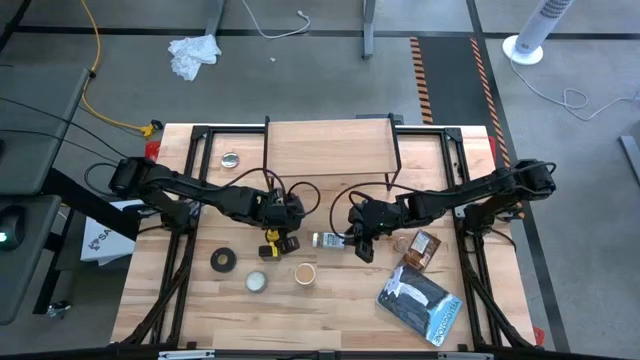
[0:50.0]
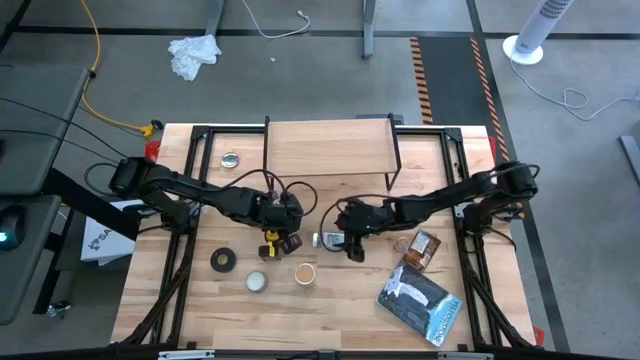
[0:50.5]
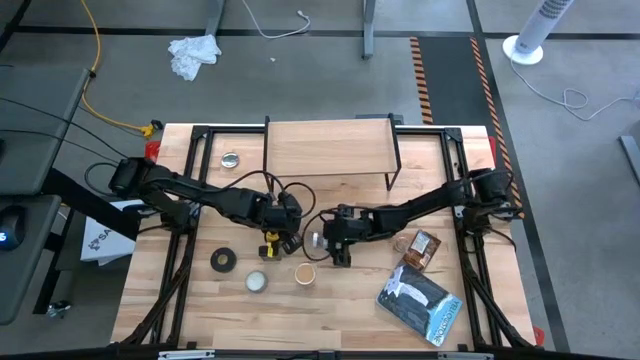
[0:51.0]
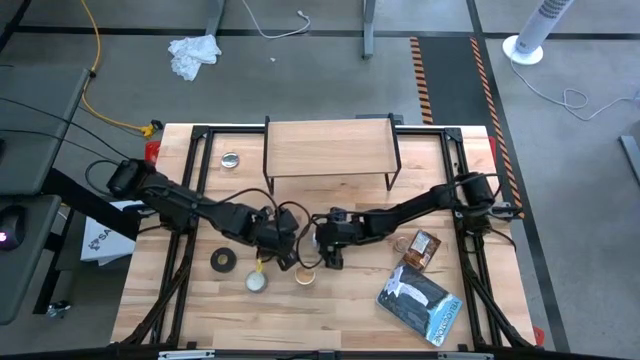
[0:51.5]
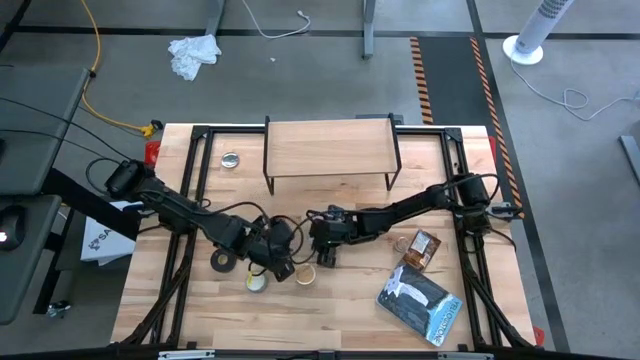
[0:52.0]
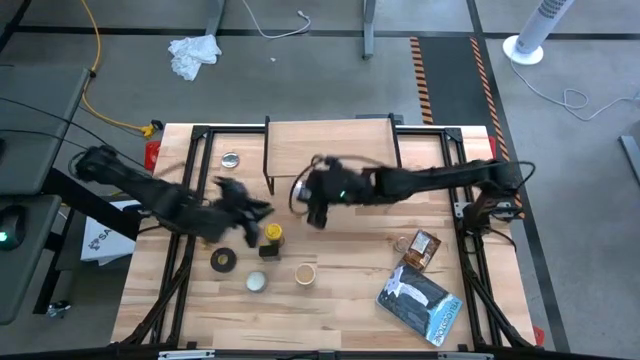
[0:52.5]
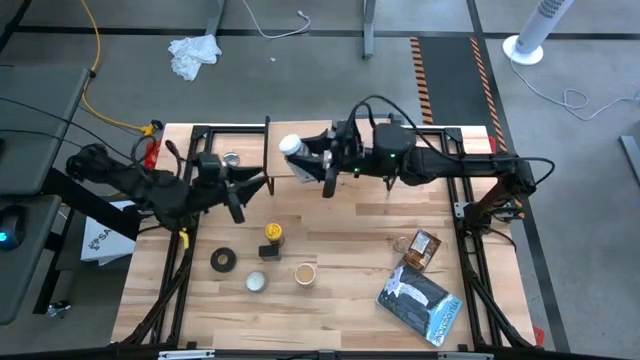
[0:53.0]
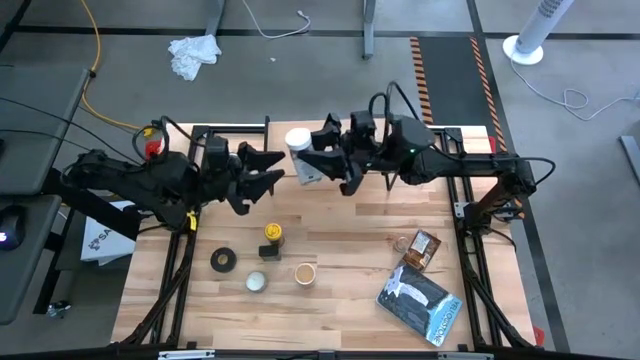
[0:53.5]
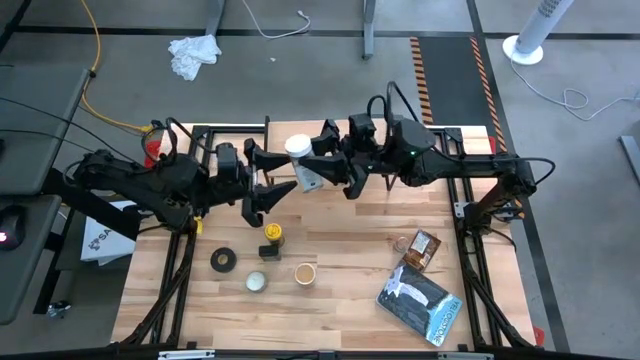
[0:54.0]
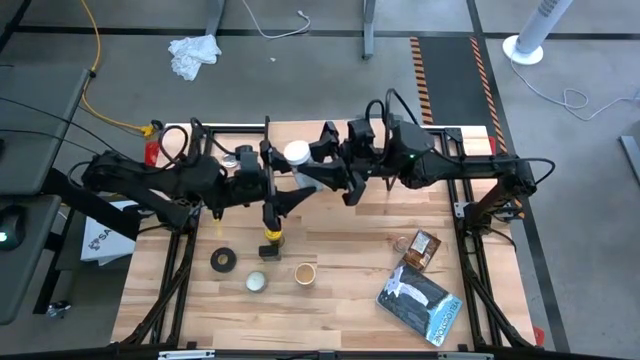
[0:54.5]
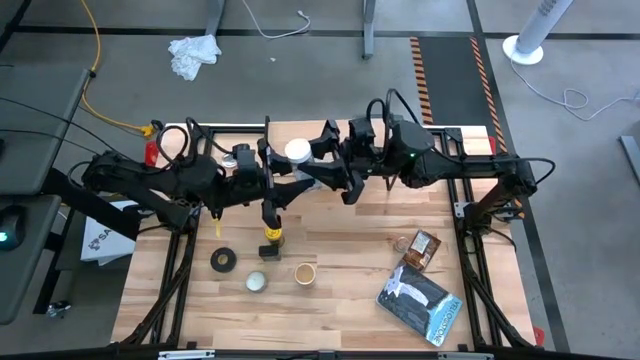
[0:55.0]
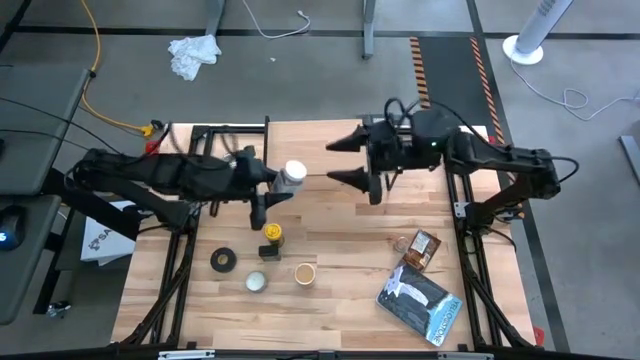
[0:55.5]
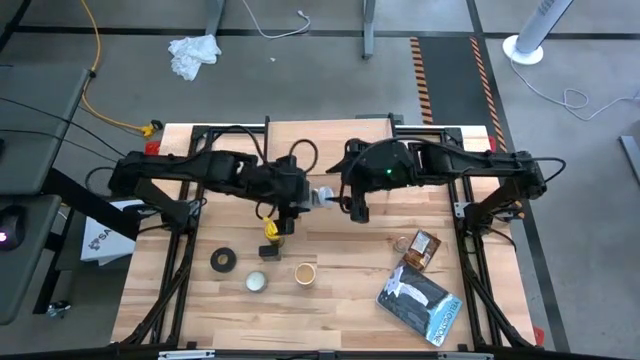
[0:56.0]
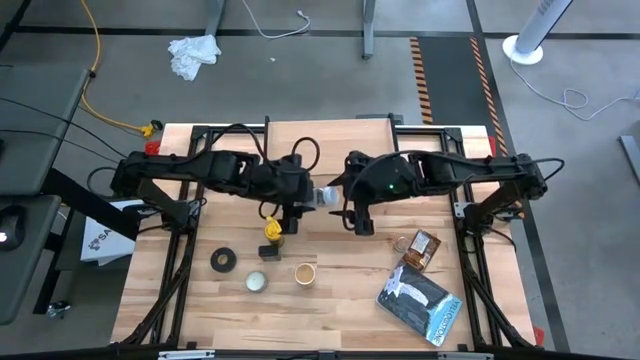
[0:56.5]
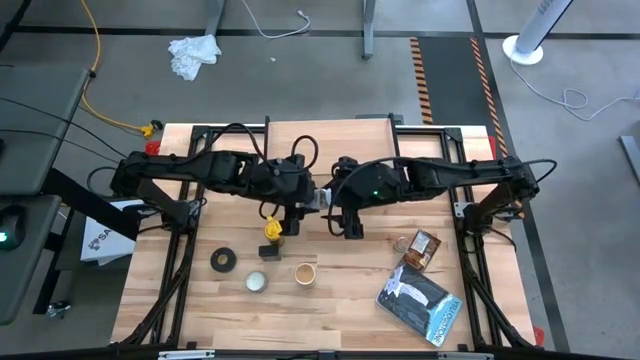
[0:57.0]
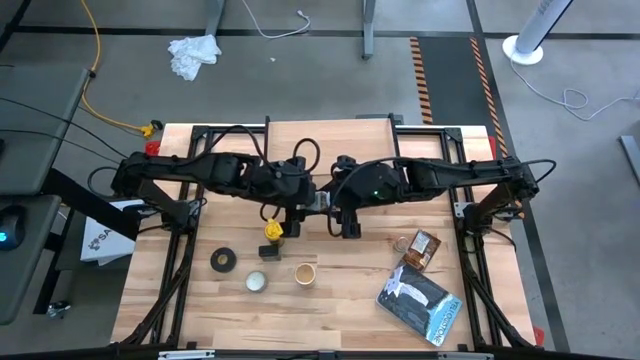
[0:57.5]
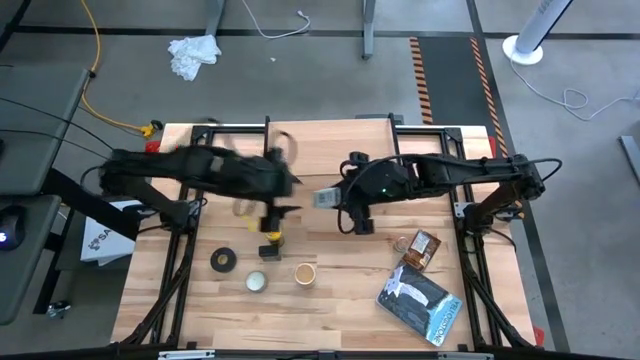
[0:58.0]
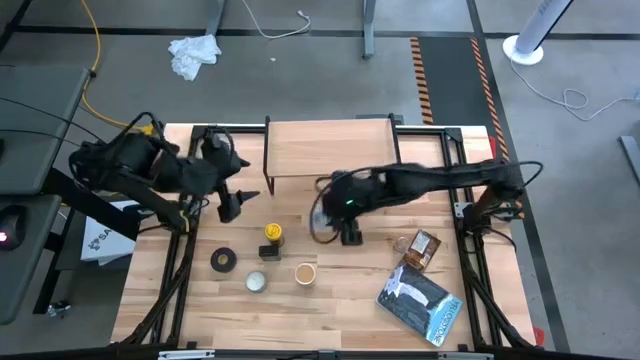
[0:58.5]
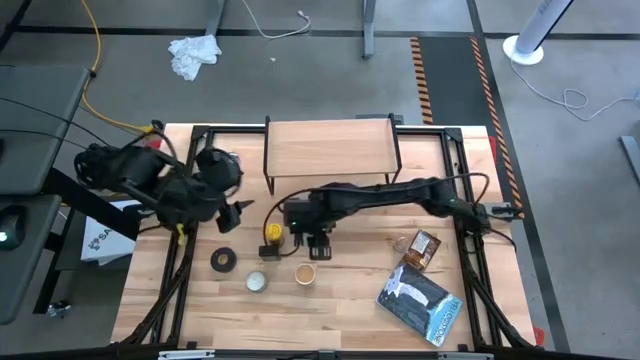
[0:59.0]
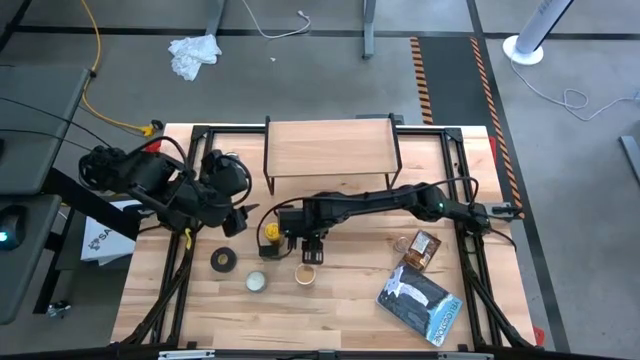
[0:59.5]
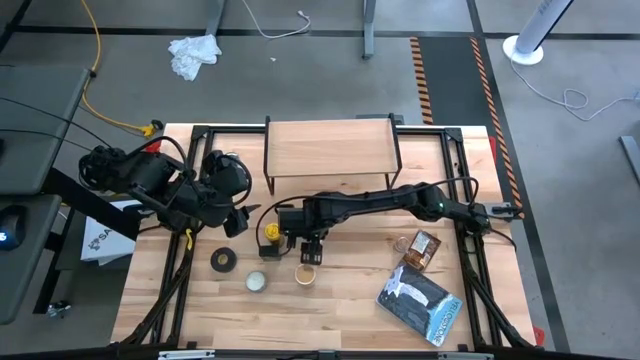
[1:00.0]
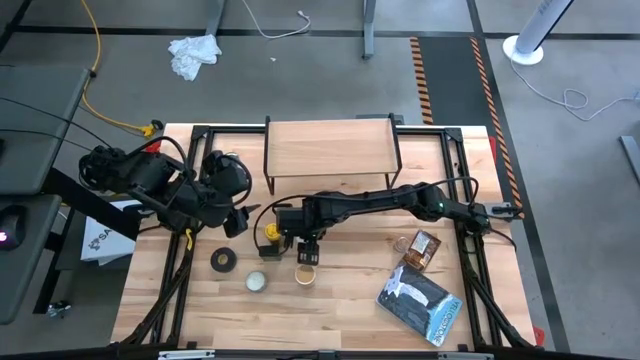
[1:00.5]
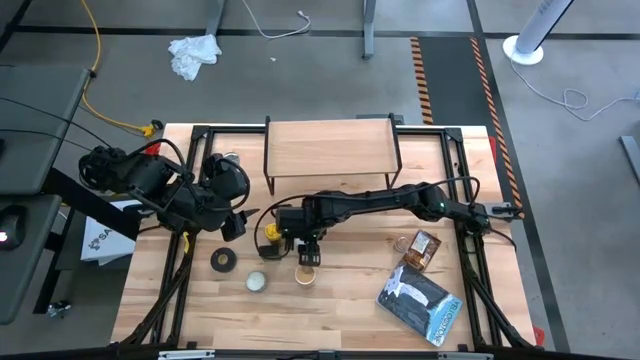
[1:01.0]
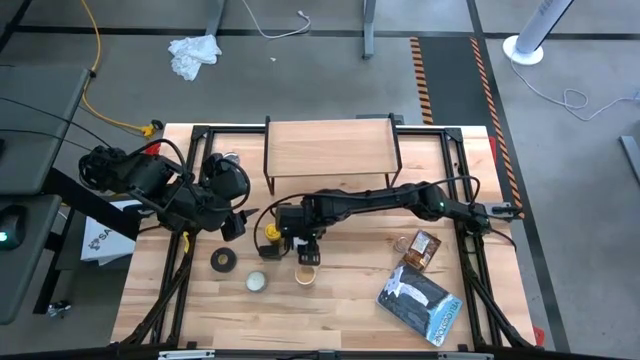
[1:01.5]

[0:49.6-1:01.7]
Task: Shelf spices
Adjust the white seasoning bottle

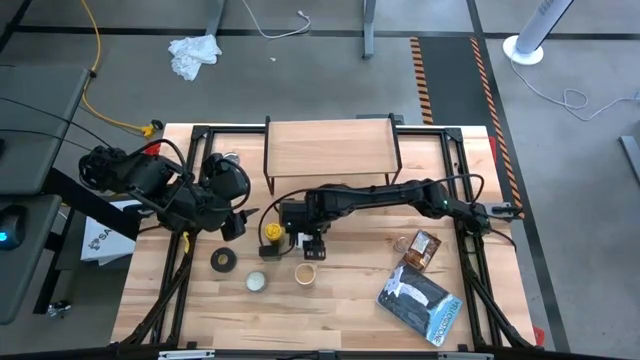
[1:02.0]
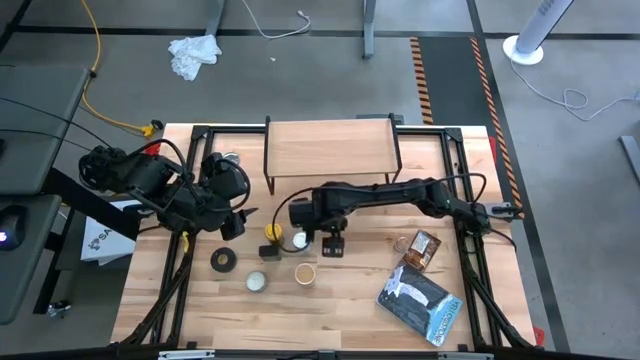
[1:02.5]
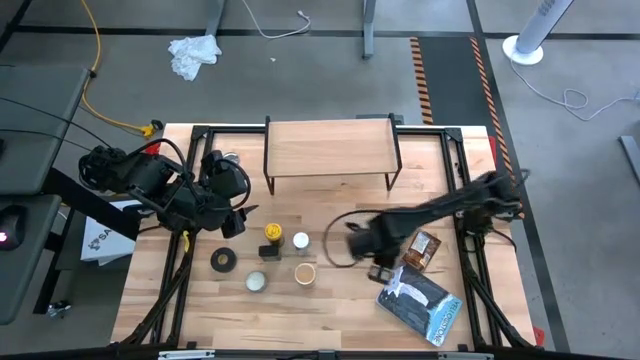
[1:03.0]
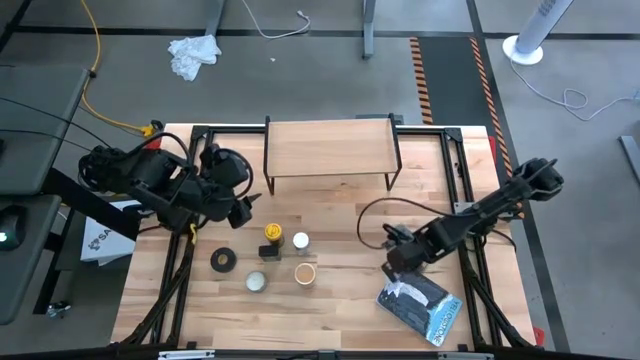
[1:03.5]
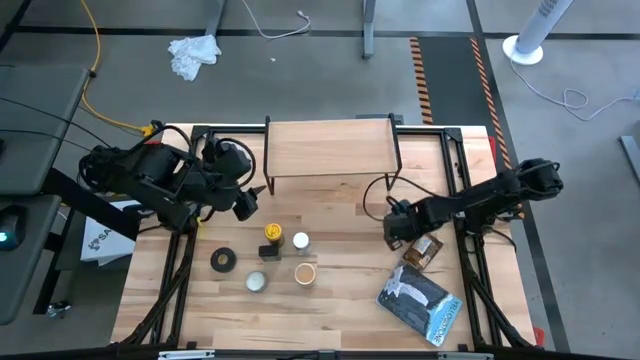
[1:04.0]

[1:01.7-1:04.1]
Adjust the brown seasoning bottle

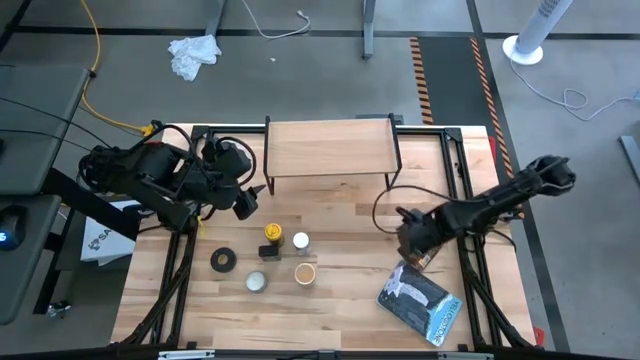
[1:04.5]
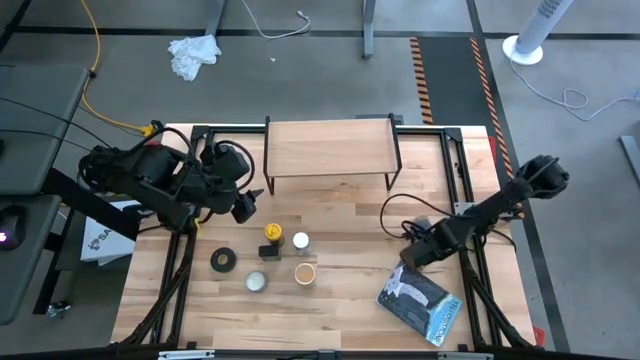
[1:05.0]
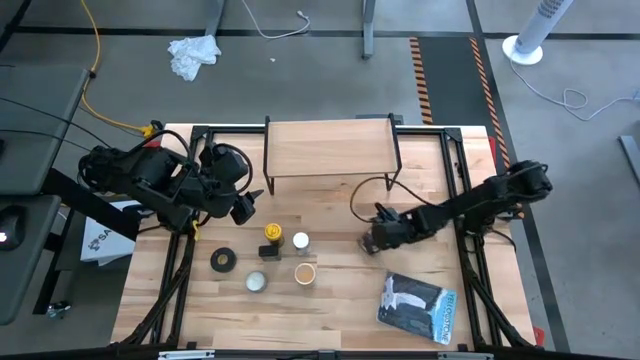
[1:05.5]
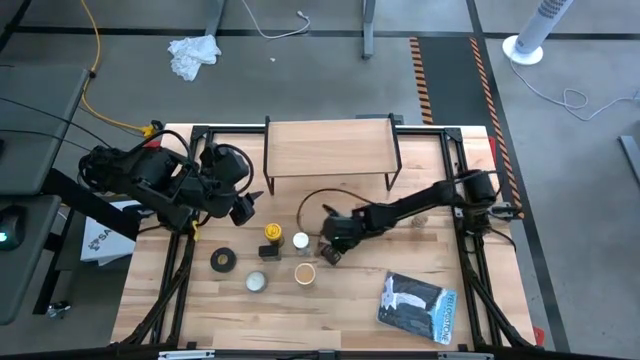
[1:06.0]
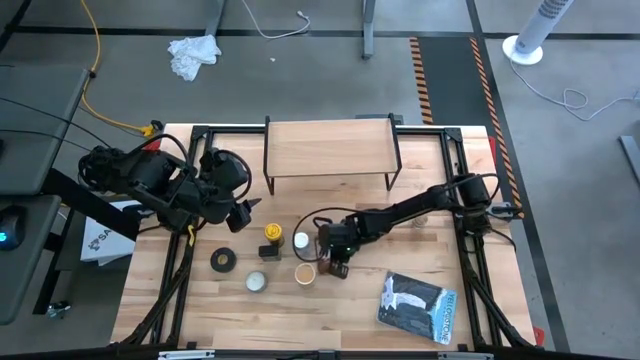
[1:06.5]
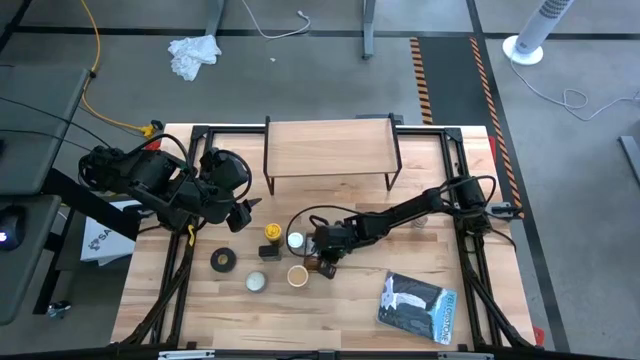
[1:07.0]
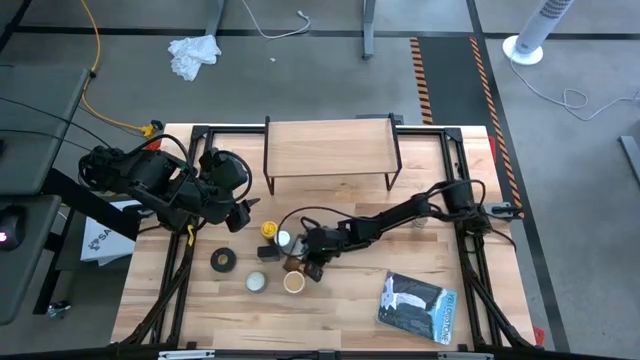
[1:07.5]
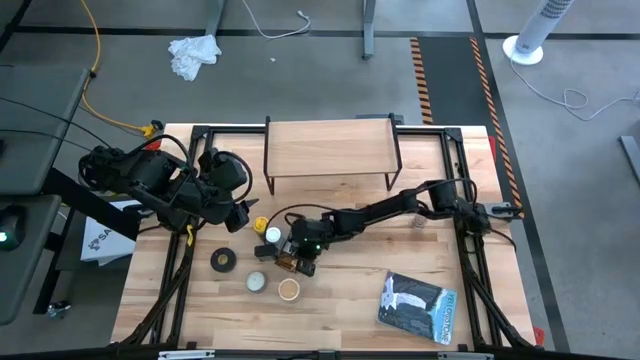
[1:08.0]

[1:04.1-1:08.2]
Move the seasoning pack to the center of the table

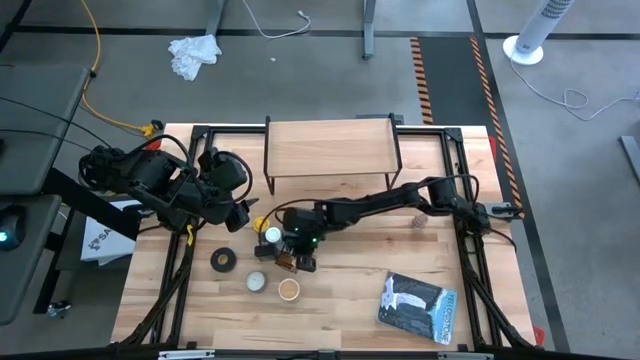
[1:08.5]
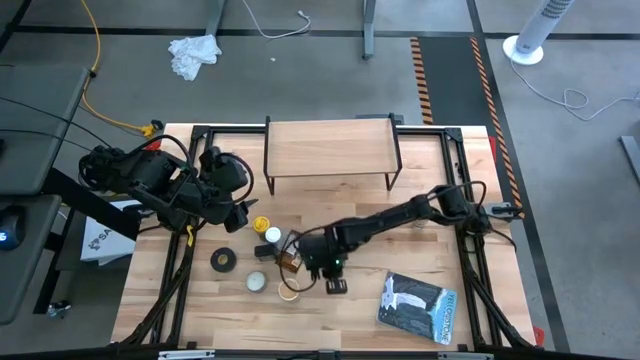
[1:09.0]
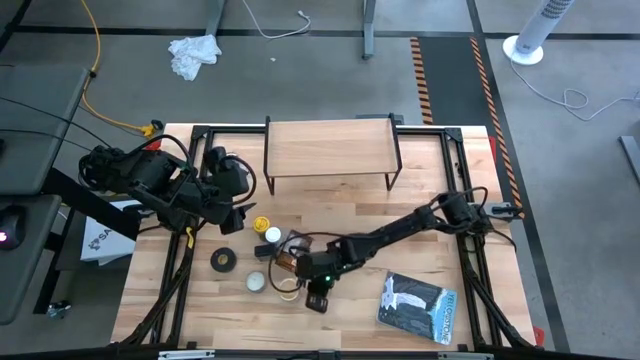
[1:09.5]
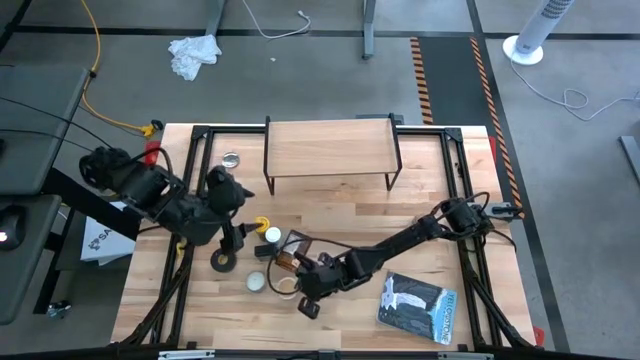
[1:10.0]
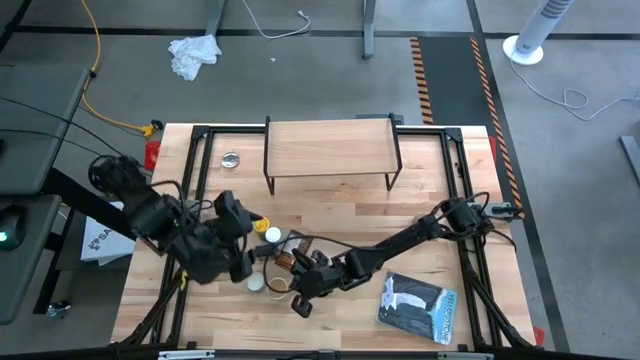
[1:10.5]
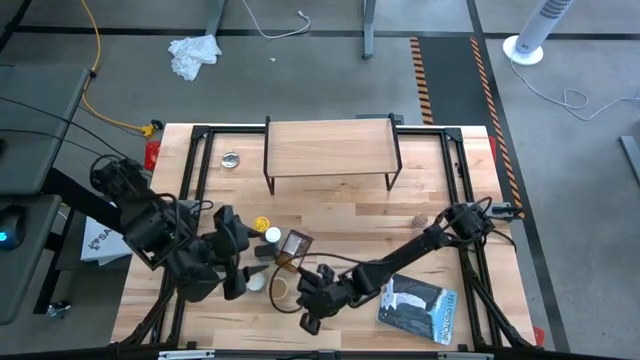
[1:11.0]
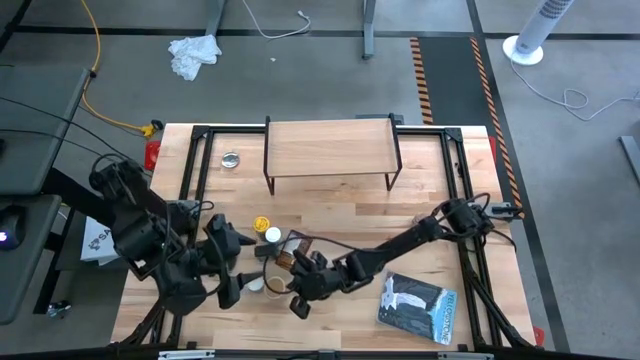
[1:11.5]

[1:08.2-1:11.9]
Adjust the gold seasoning bottle
